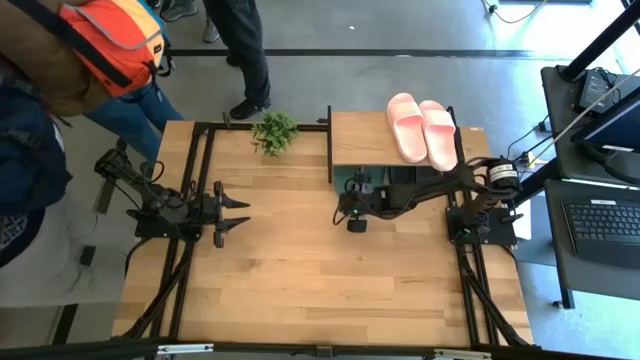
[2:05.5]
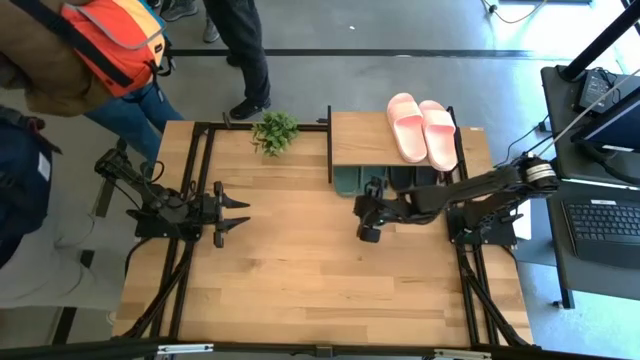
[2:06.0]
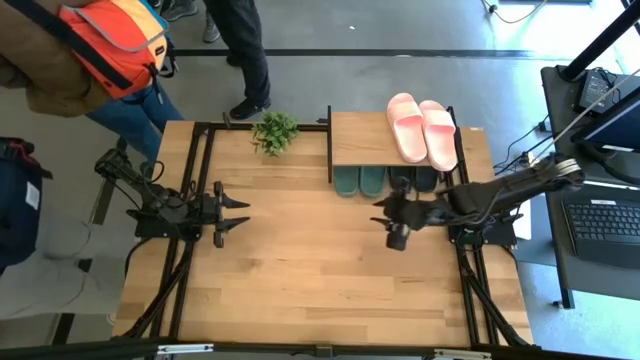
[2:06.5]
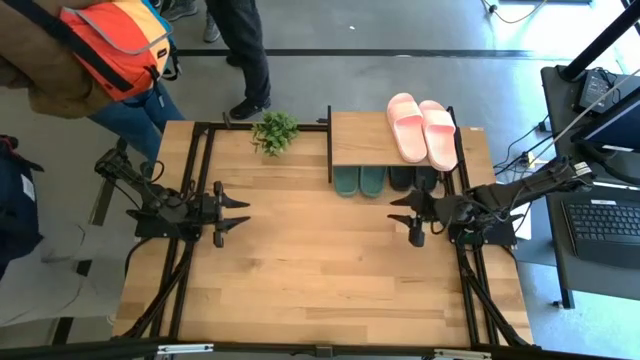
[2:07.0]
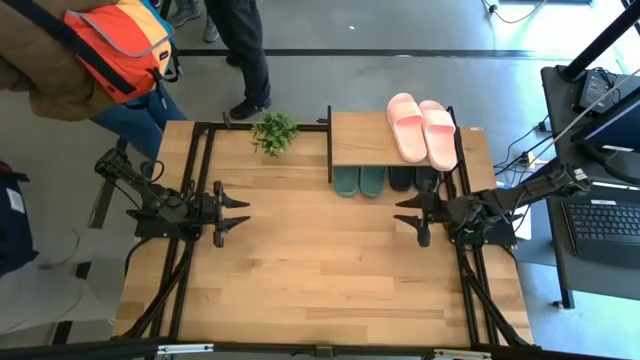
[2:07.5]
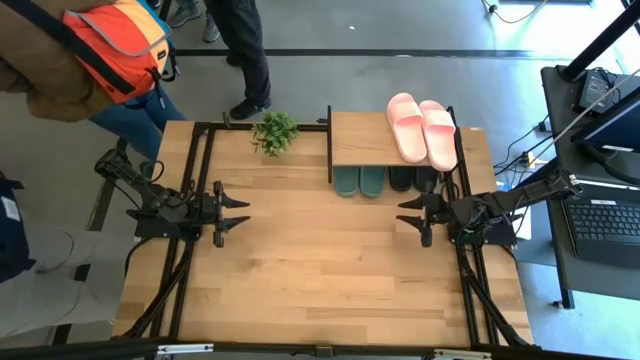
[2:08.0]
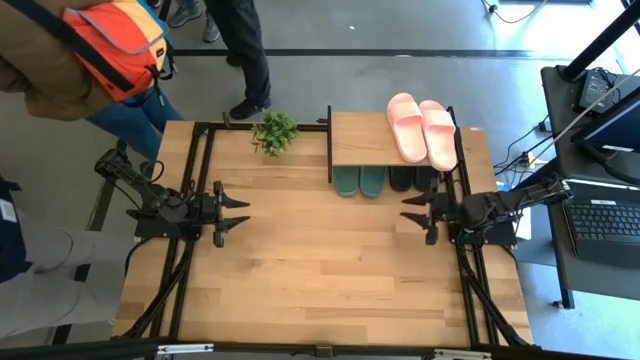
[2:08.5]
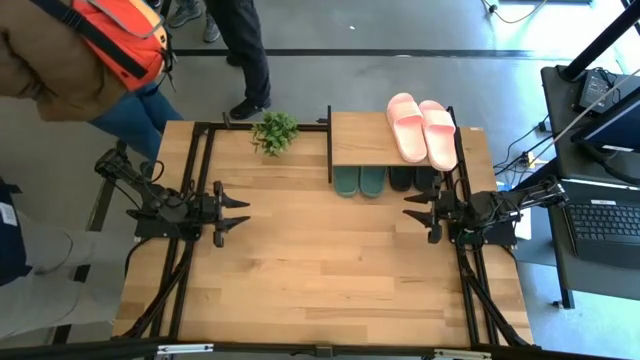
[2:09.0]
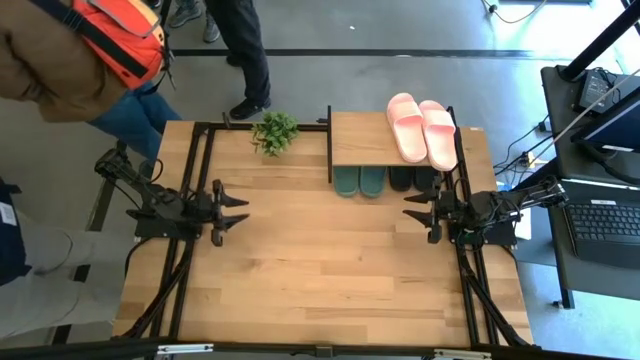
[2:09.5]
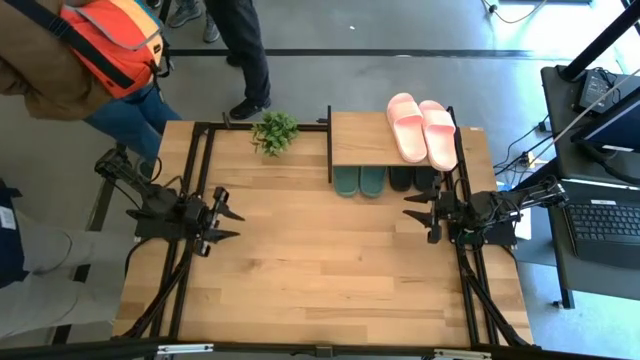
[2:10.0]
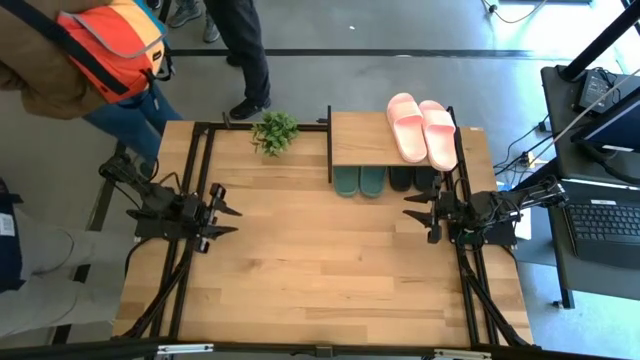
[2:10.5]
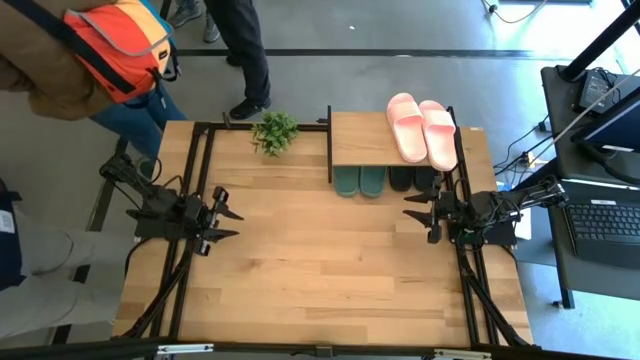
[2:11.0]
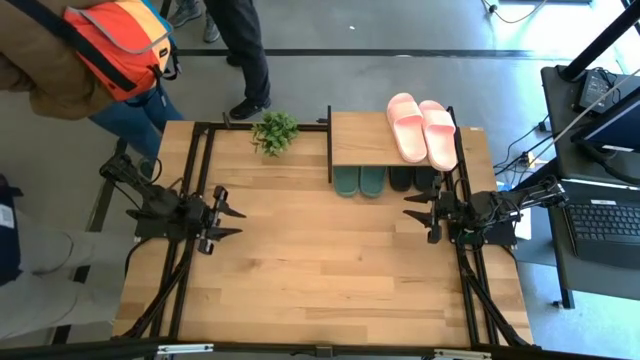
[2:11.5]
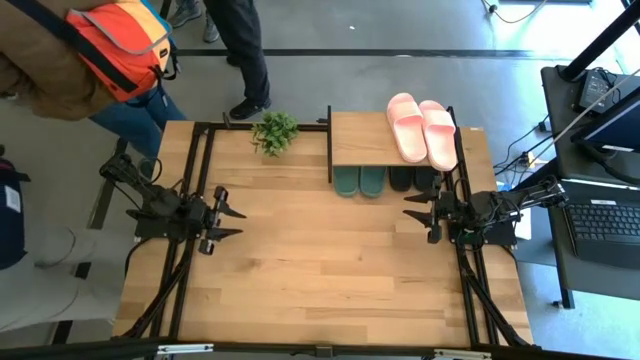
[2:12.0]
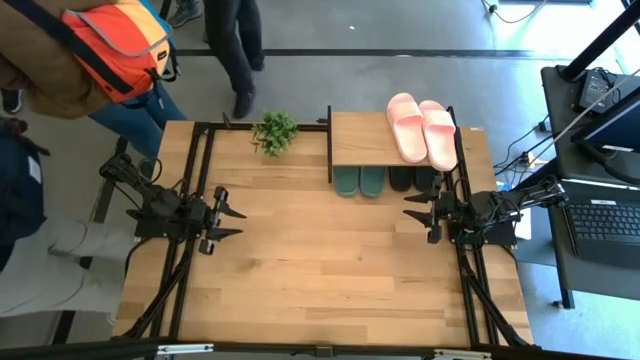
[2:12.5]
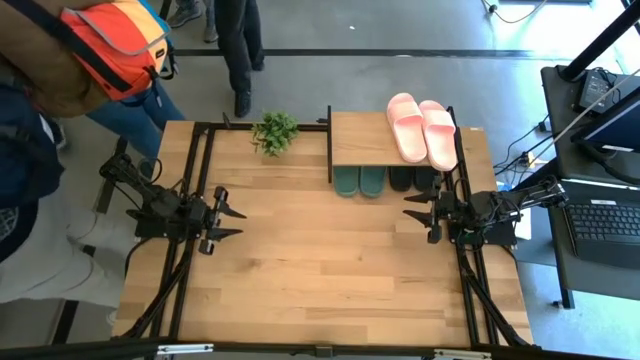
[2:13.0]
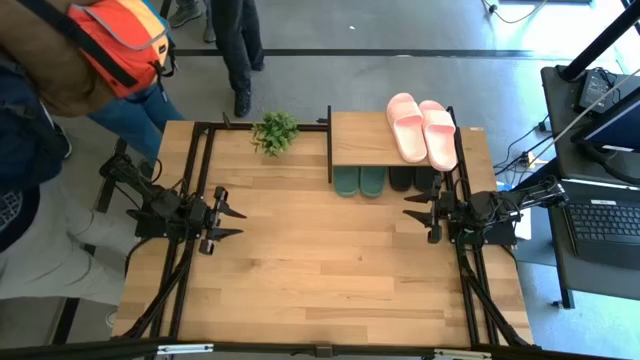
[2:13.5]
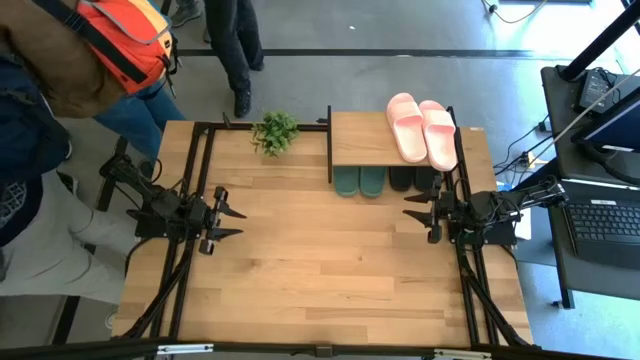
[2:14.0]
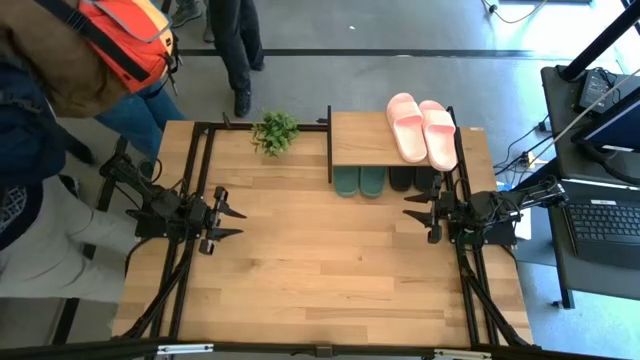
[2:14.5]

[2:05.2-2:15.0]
Task: Pick and place slides into the shelf
Return to Home Position

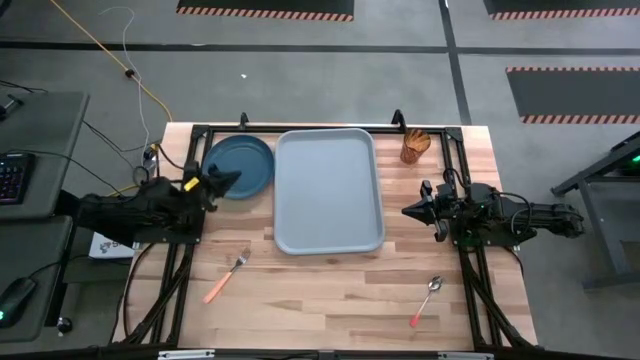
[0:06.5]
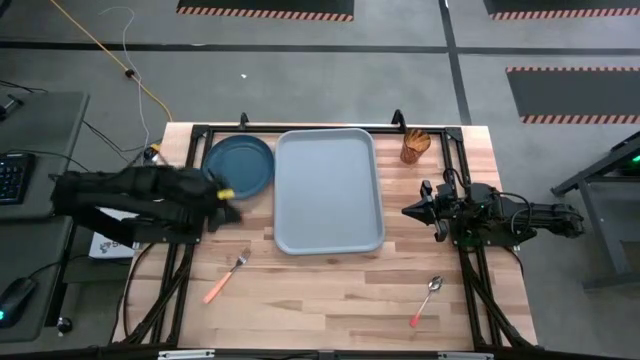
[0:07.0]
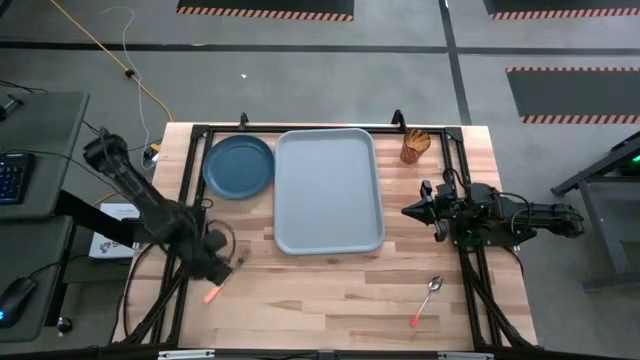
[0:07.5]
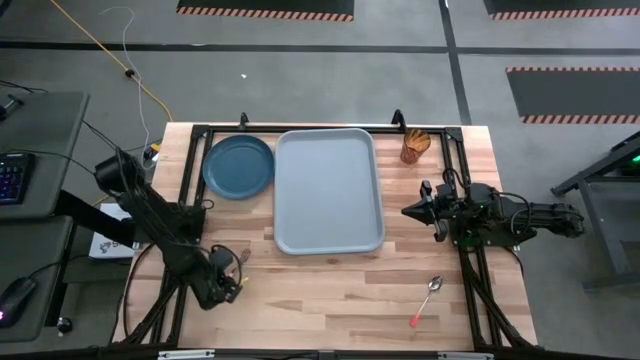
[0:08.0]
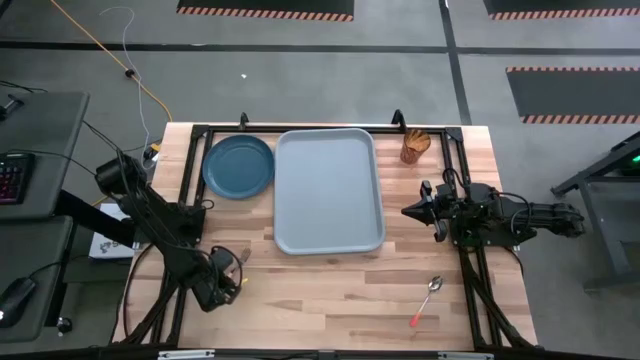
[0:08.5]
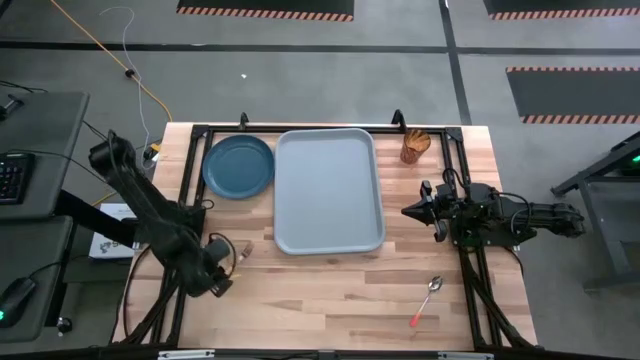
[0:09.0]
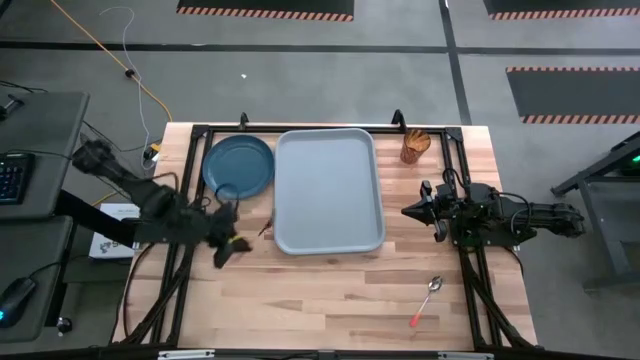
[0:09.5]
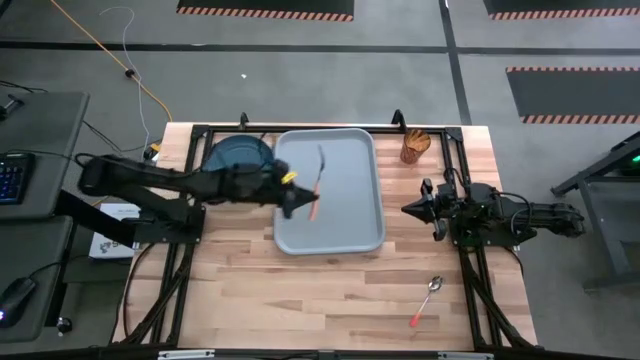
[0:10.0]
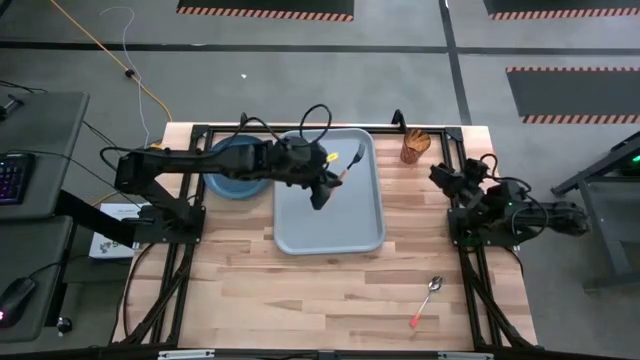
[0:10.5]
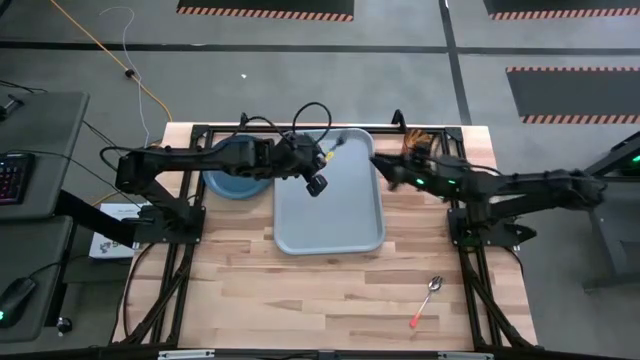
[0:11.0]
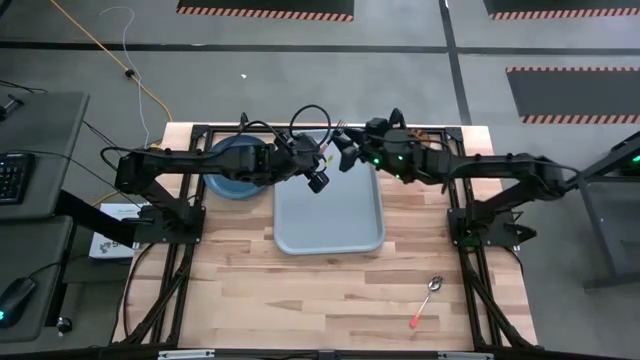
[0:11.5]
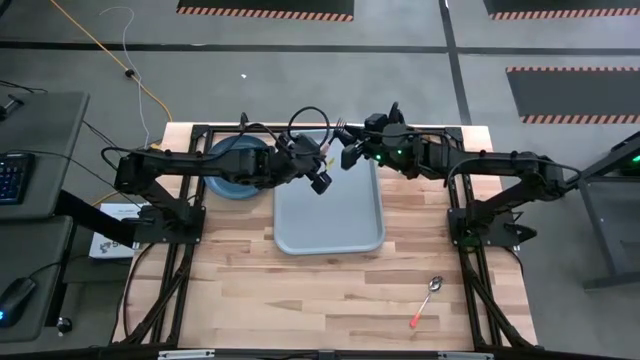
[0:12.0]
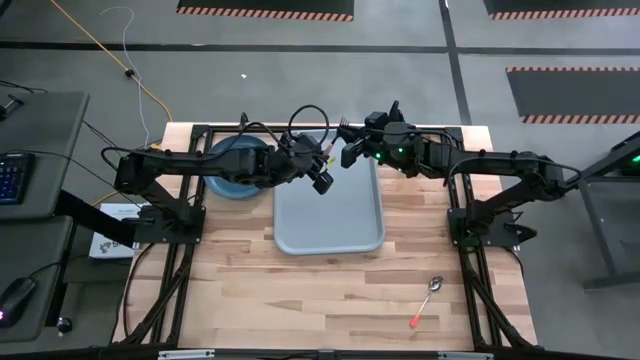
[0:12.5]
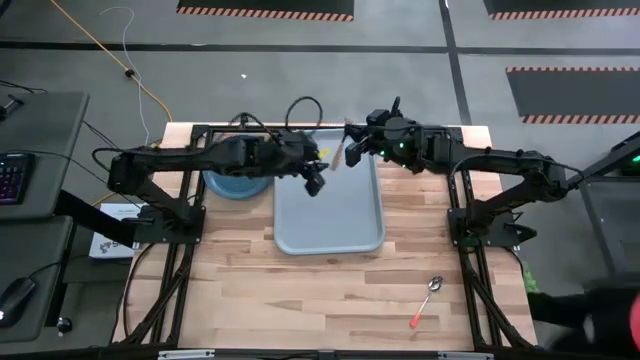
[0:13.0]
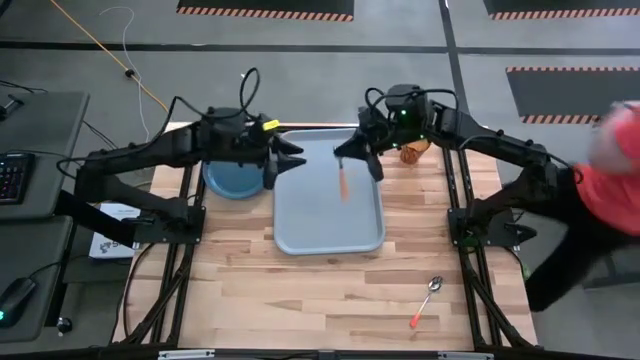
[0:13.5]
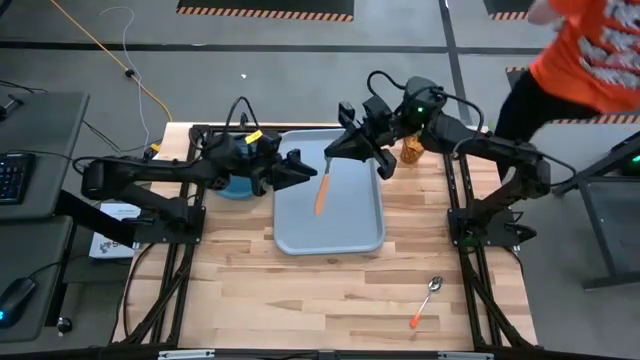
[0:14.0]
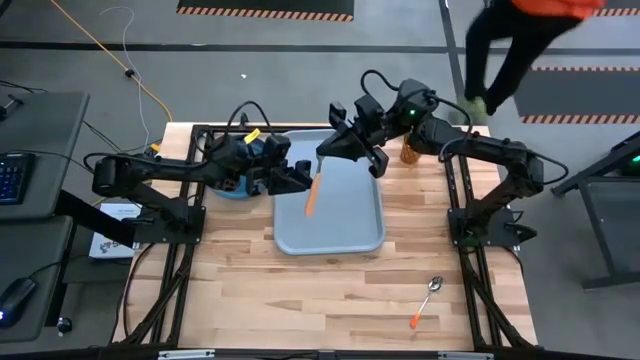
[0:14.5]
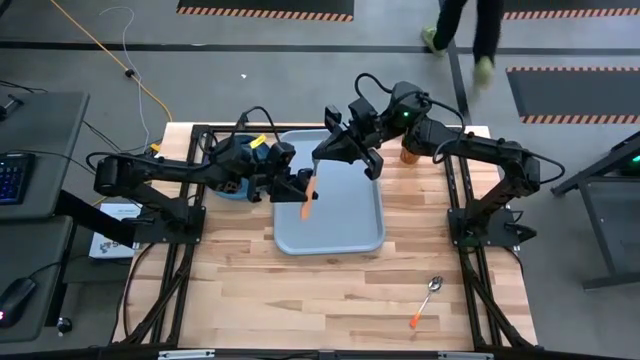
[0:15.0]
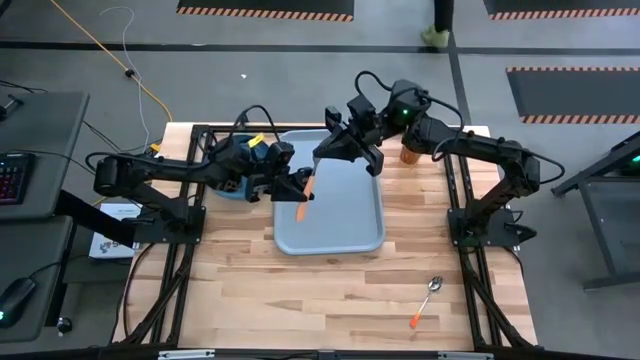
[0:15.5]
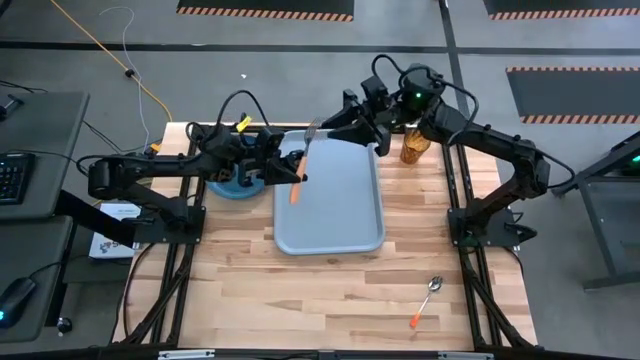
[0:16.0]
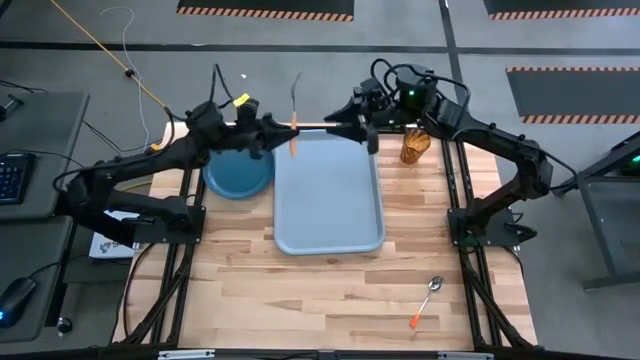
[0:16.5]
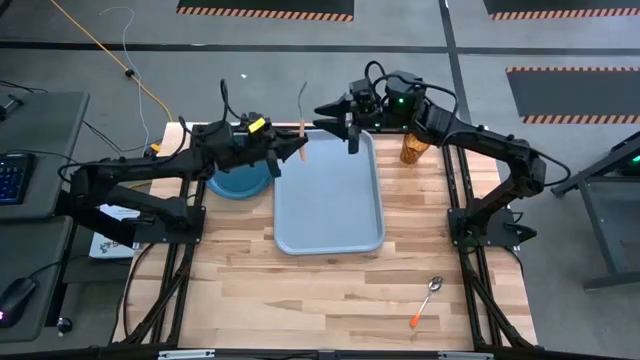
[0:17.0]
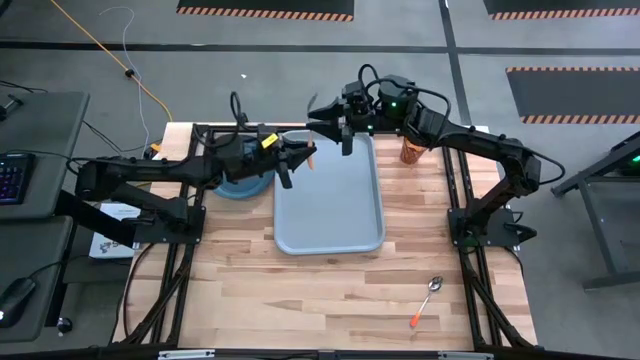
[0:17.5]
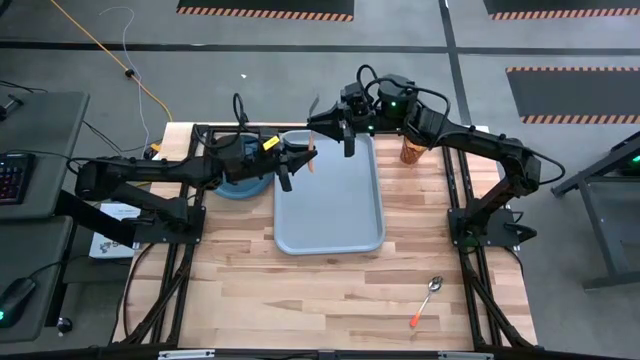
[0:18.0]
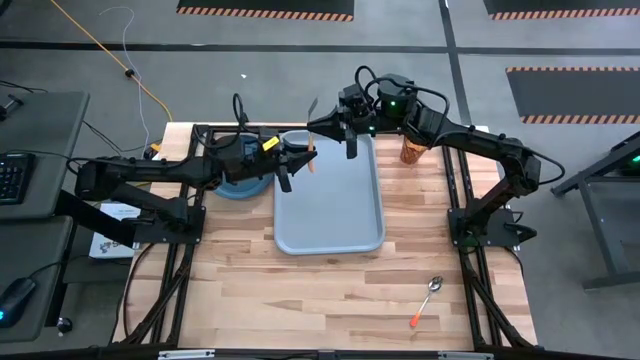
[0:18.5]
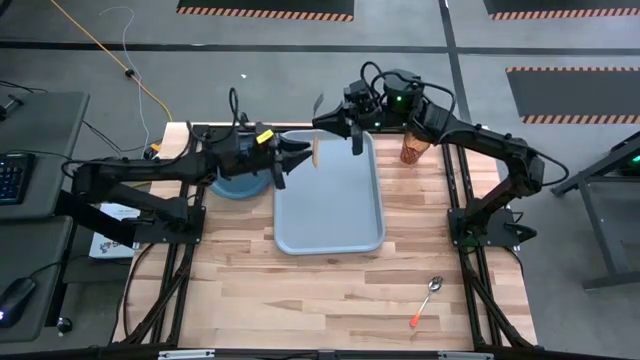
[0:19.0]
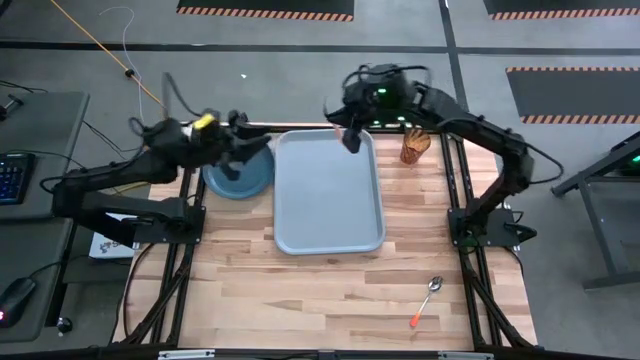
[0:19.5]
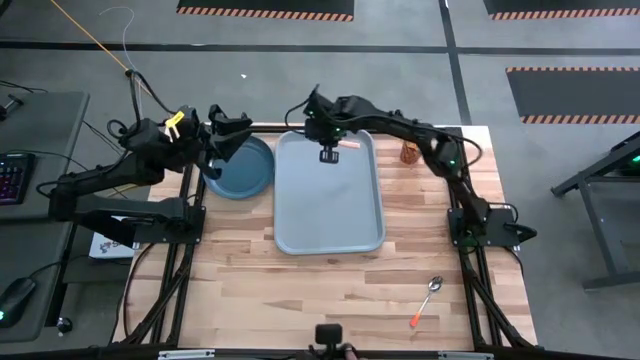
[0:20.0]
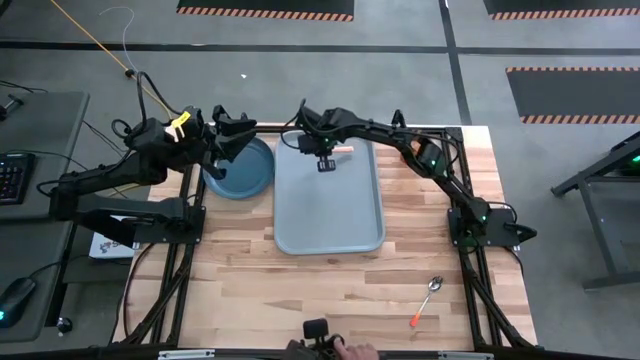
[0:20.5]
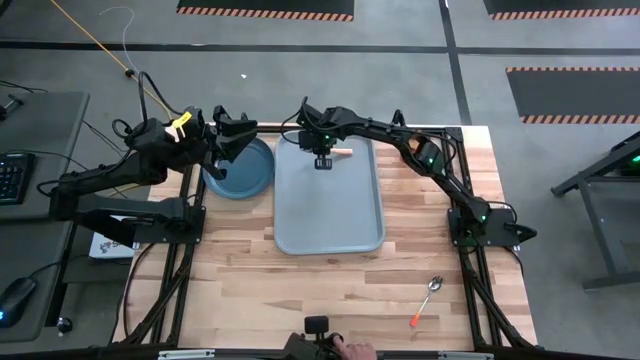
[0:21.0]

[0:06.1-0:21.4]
Task: Pick and place plate/cup/fork/spoon on tray
Put the light orange fork on the top of the gray tray
